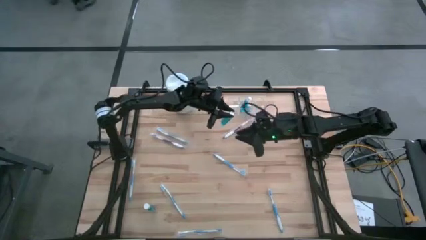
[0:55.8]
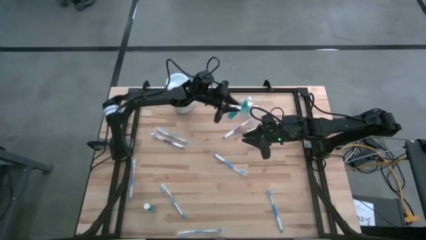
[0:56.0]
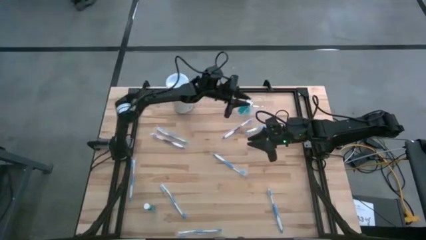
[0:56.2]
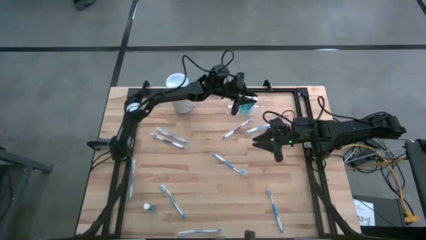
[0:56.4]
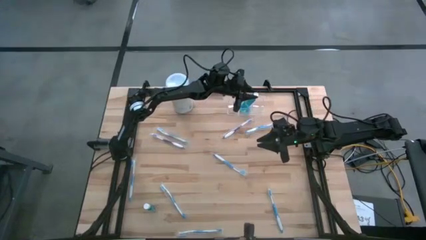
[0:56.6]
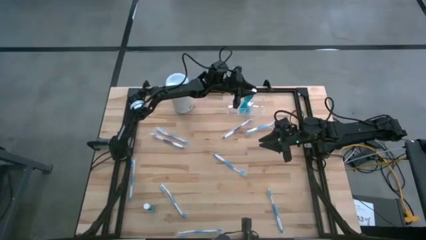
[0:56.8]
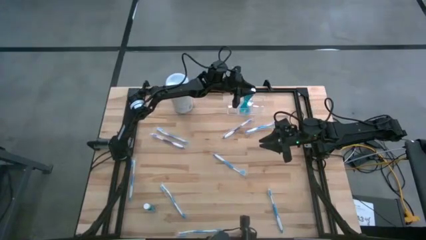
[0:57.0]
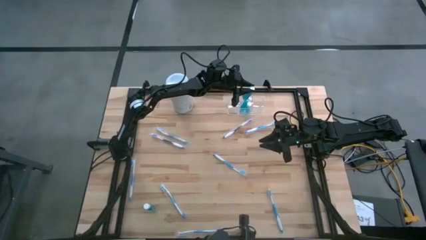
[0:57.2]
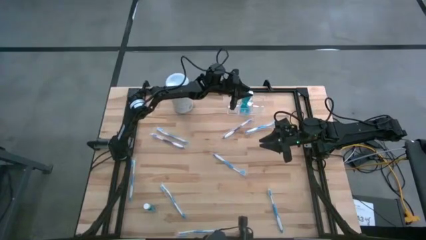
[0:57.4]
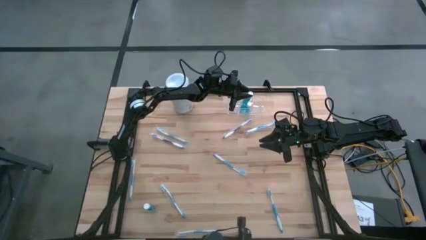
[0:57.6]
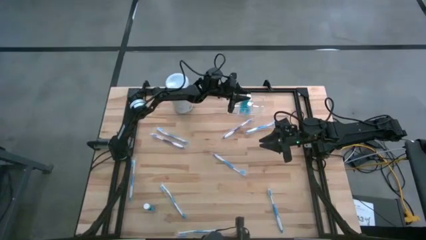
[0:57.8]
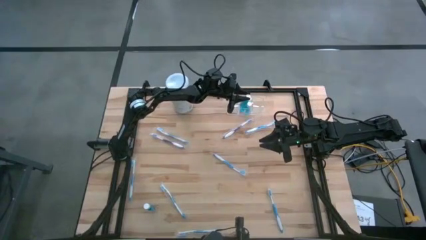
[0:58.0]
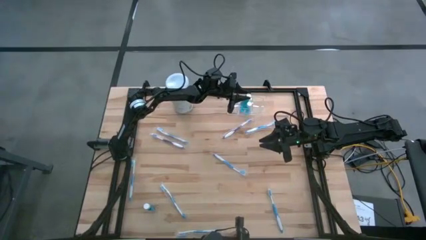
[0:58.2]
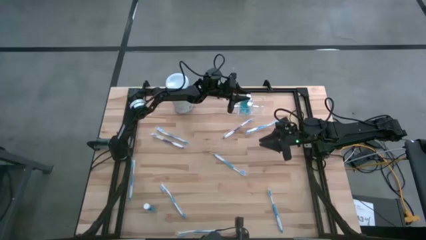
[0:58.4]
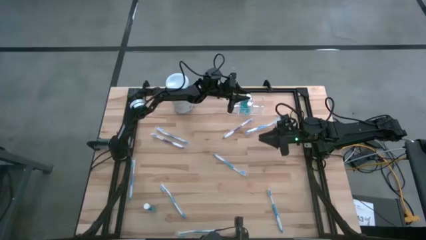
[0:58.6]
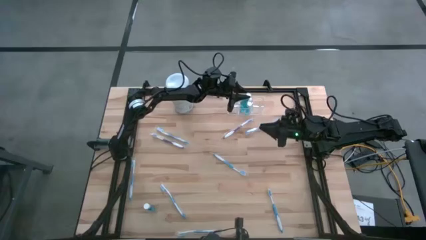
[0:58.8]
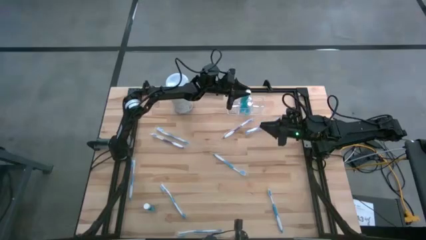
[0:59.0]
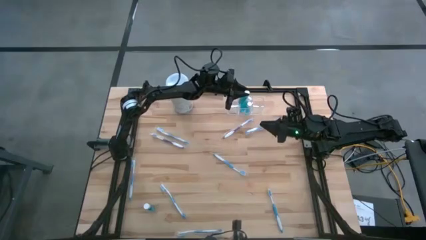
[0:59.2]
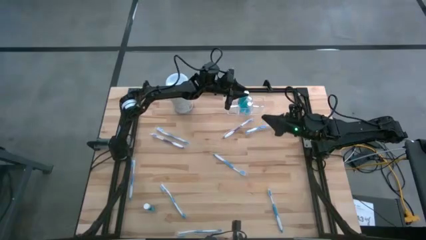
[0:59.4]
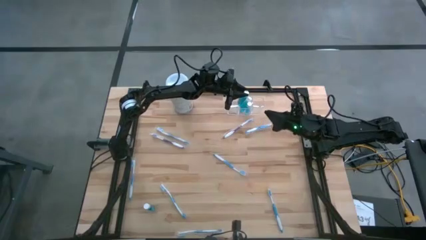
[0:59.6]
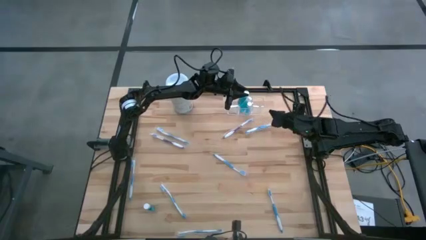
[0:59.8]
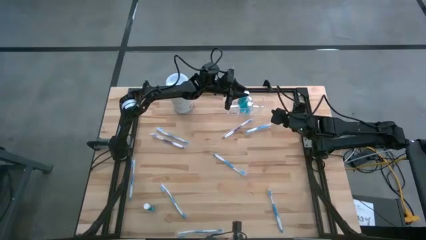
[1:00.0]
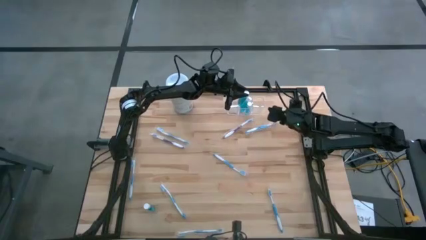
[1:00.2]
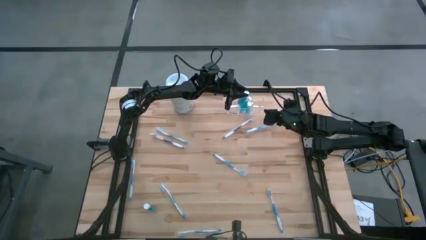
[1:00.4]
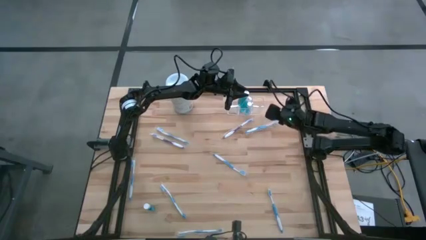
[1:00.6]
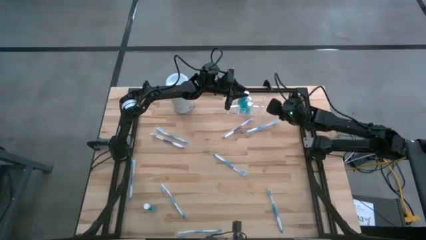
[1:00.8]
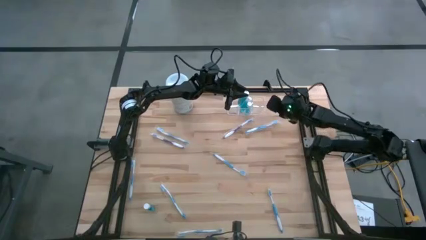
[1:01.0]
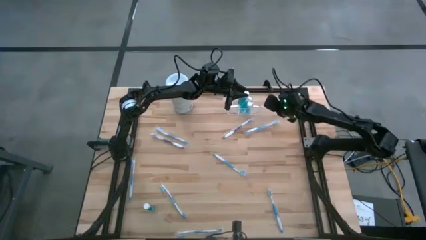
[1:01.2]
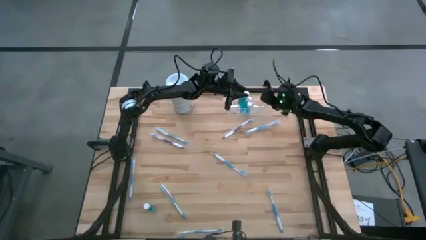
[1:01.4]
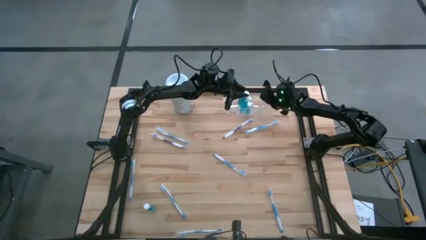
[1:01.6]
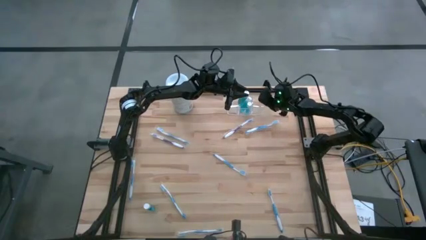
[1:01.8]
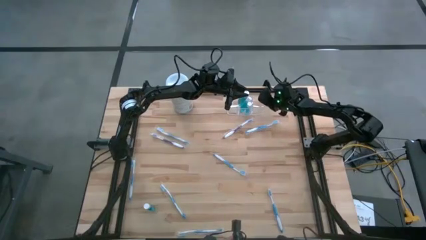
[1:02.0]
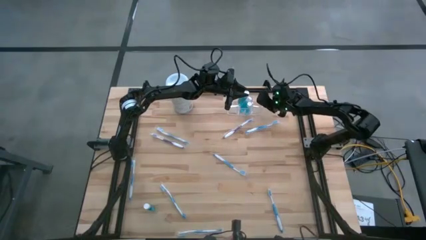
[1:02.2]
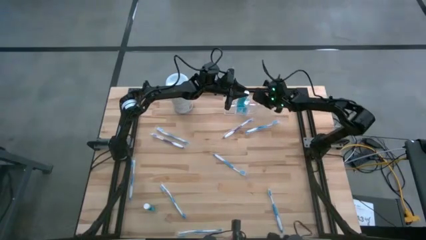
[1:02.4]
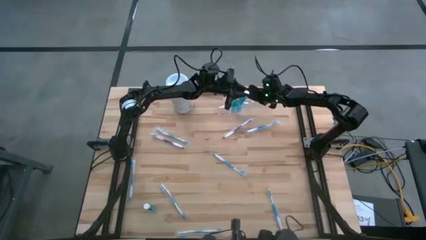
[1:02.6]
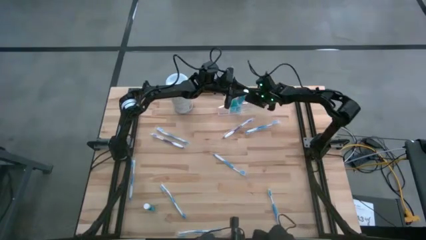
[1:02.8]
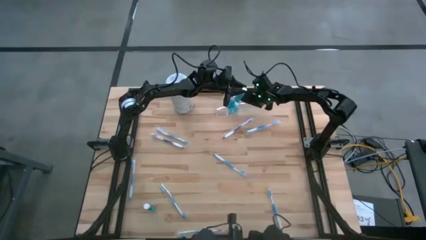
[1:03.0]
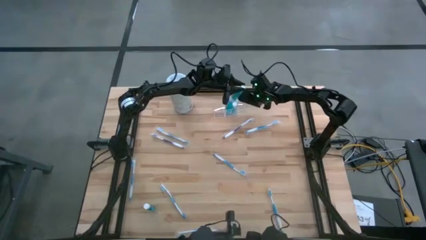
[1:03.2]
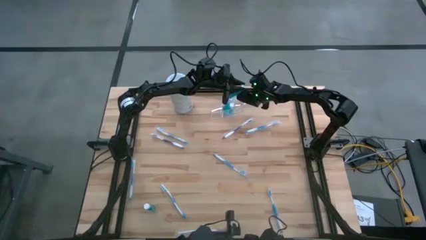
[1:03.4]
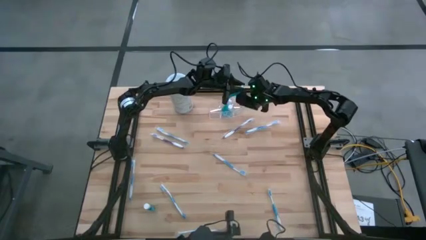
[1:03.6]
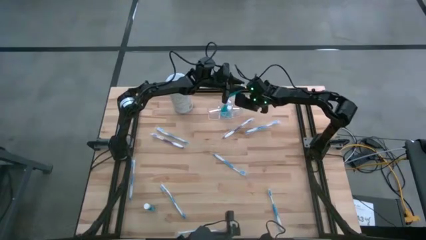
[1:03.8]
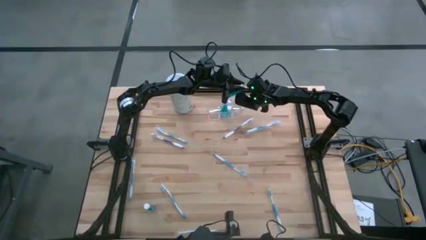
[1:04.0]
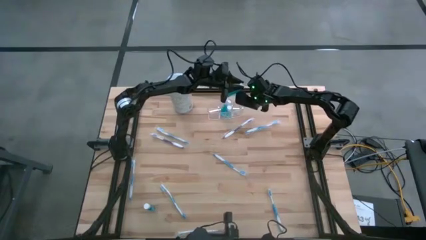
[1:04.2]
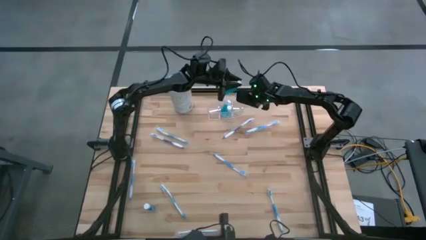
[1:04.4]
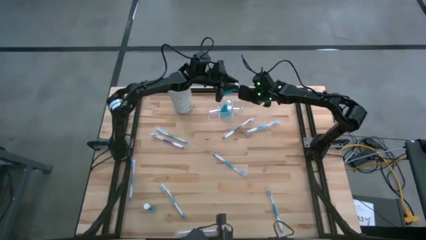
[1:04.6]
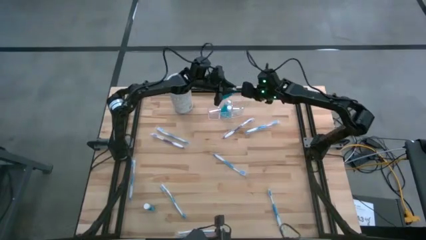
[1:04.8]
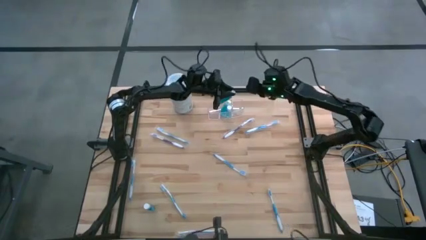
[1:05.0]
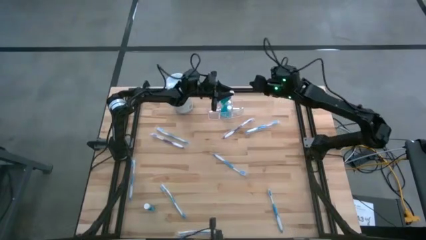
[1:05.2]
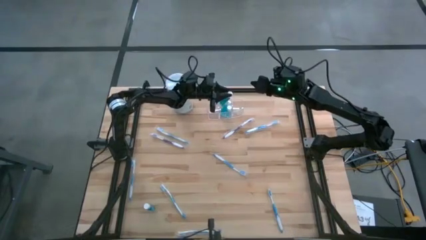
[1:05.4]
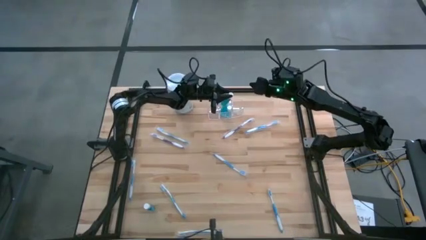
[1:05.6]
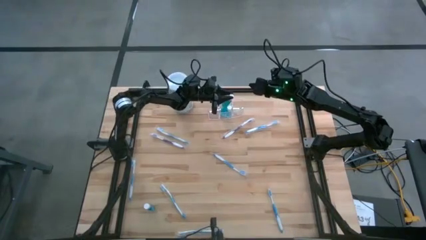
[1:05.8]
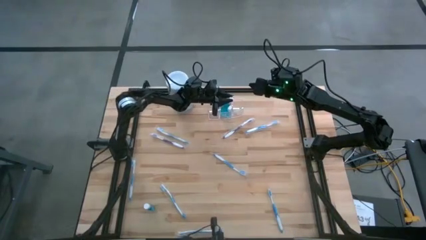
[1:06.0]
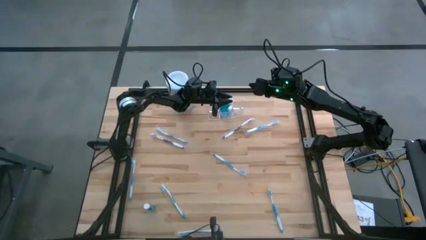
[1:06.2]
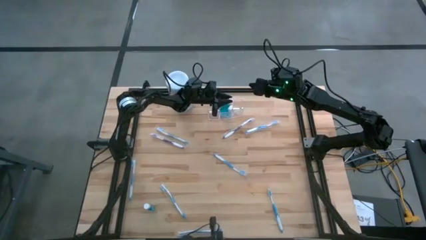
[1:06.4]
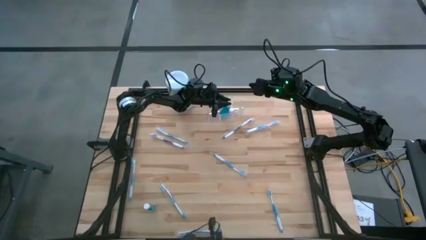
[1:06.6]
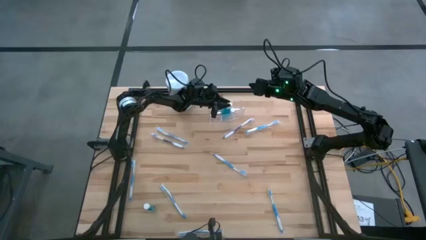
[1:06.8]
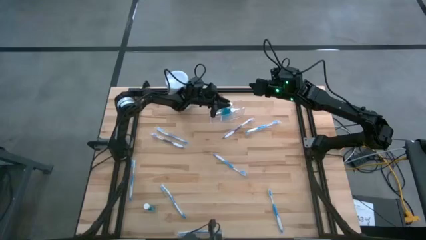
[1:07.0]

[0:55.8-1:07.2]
Task: Pick & Place toothbrushing station
Put the blue mouthwash into the middle of the transparent organizer

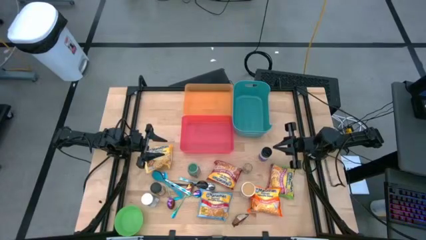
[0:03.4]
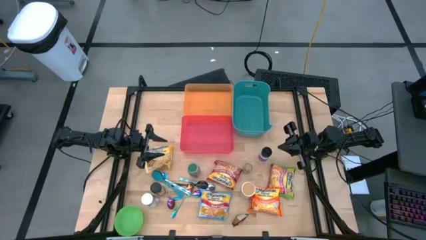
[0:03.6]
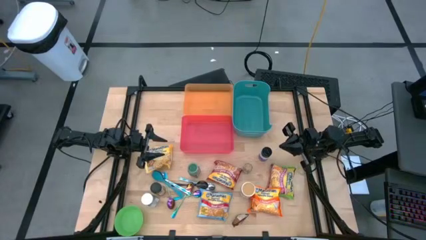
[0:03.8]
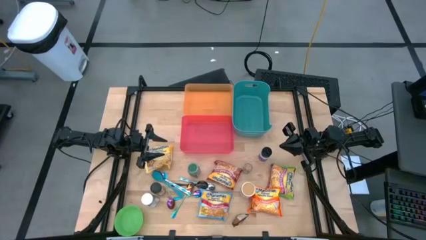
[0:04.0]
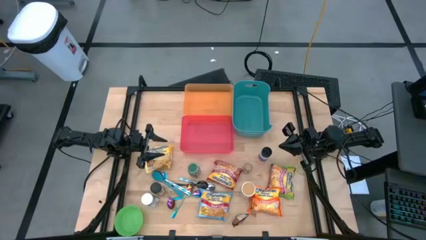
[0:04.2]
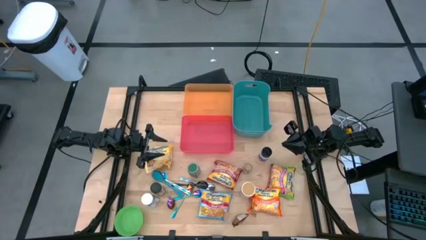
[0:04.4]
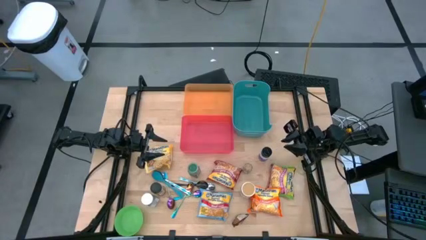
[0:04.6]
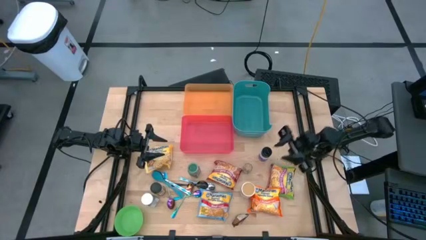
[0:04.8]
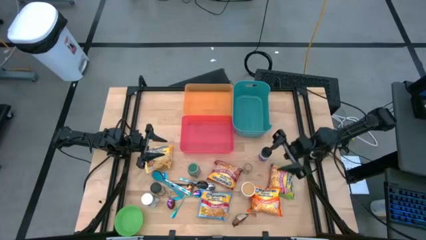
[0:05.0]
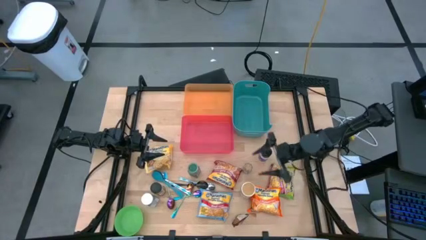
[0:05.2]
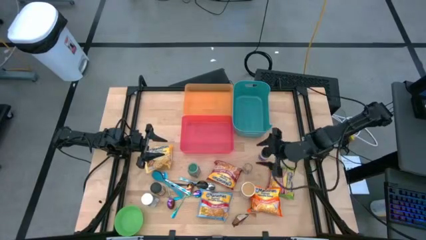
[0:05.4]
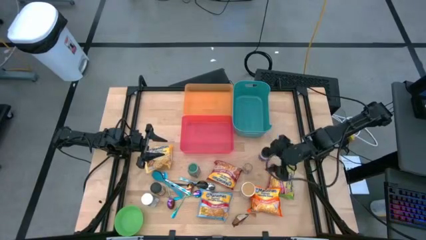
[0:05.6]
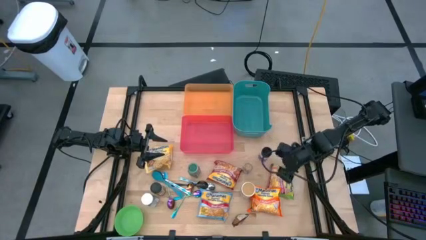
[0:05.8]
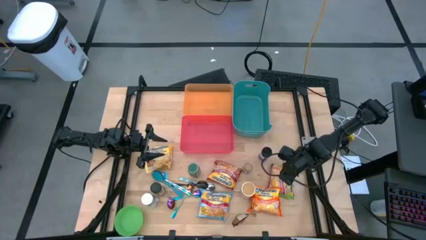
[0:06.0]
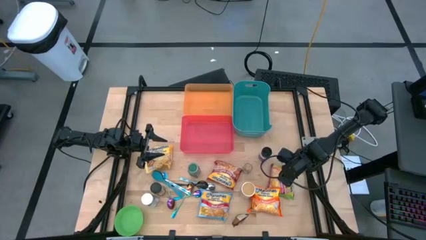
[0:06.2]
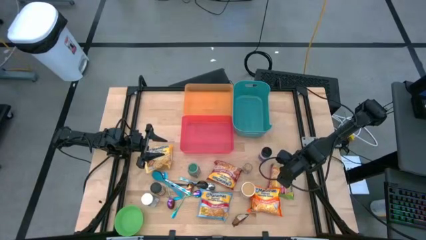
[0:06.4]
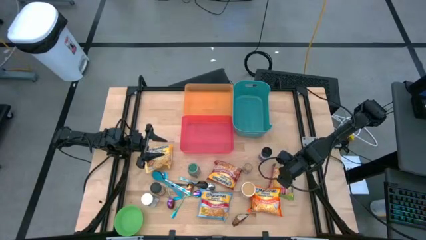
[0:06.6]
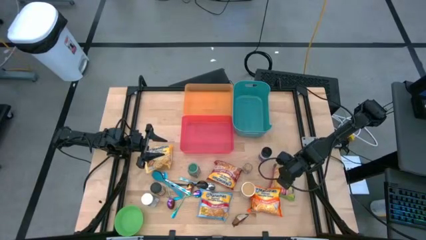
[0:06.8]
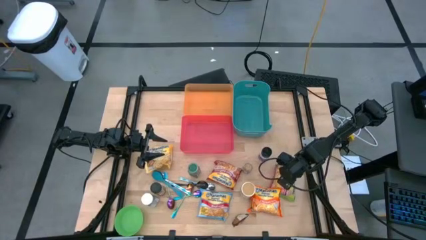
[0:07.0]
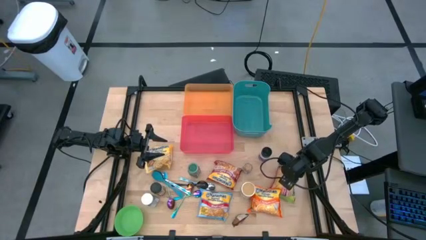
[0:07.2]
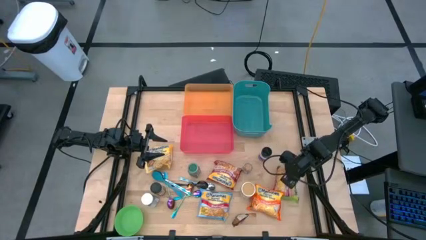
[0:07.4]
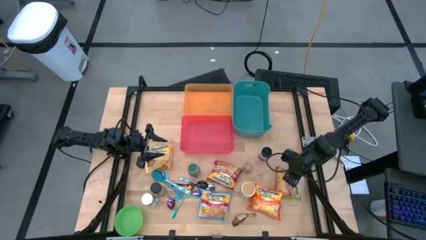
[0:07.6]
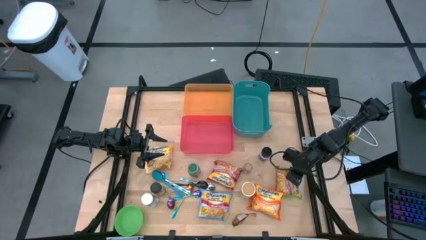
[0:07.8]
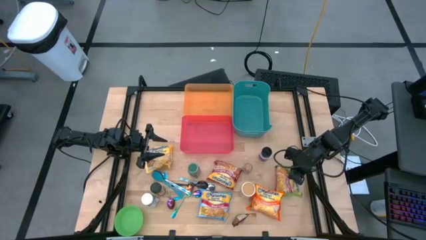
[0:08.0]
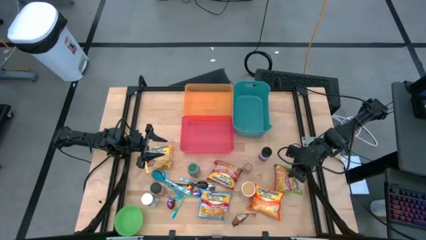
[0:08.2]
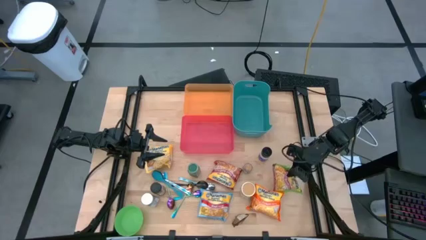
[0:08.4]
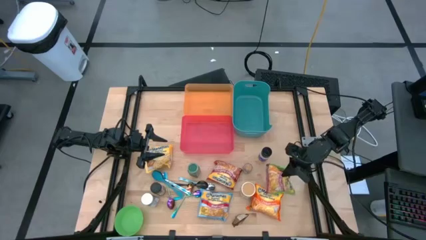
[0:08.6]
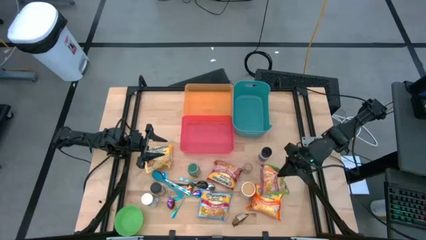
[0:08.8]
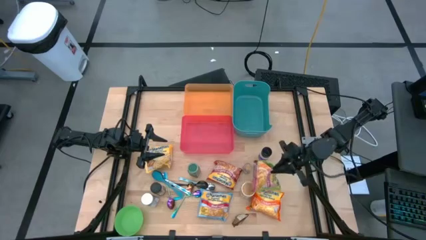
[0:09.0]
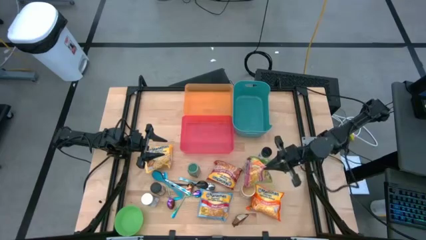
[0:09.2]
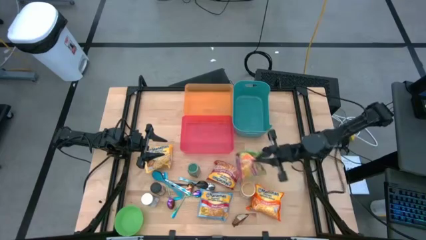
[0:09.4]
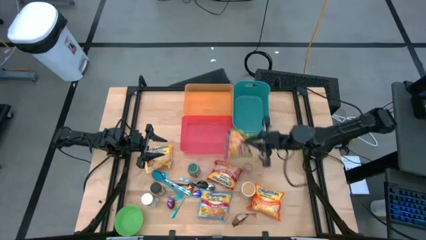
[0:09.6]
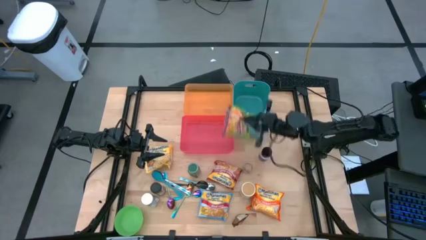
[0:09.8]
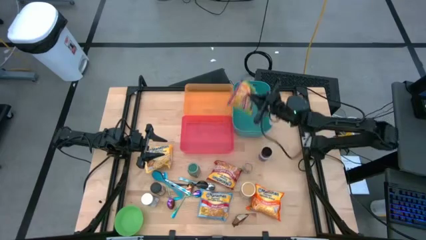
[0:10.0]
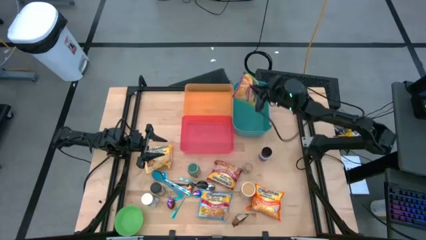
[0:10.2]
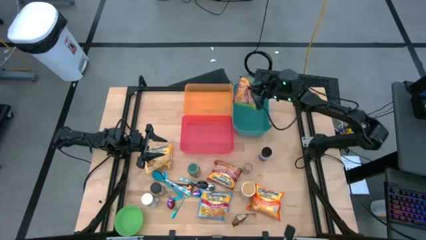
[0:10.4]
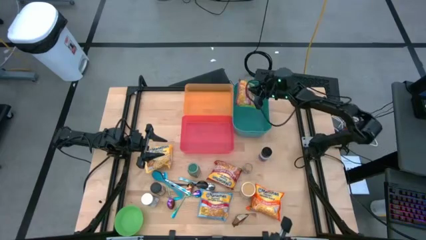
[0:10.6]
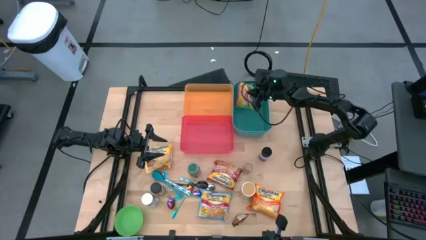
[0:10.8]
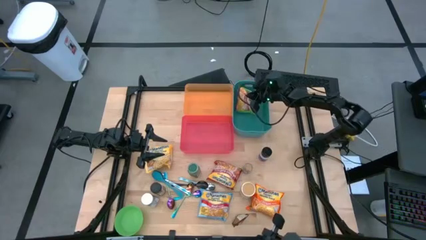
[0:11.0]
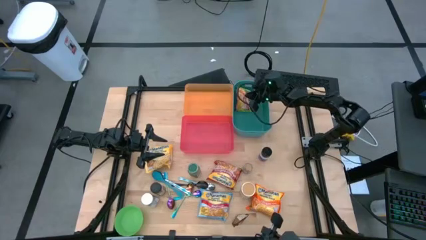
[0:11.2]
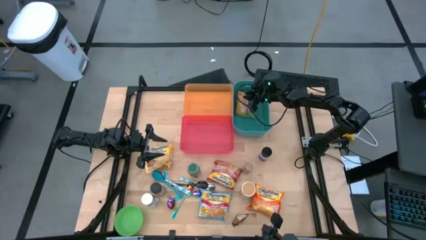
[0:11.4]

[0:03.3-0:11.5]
Task: Pick & Place Food Item
Put the green noodle pack into the blue bin
